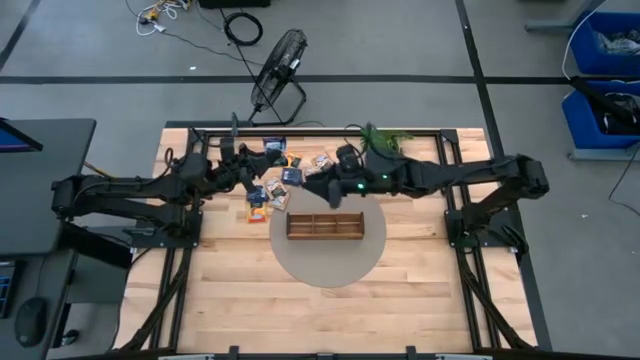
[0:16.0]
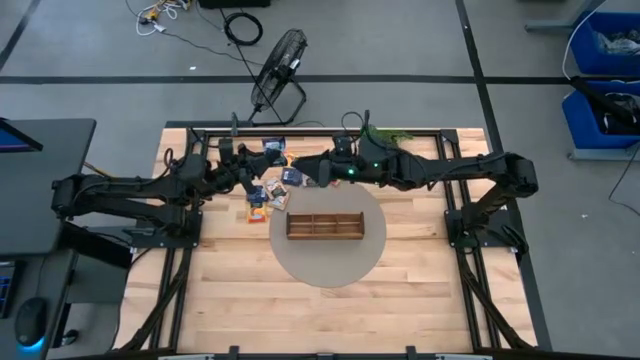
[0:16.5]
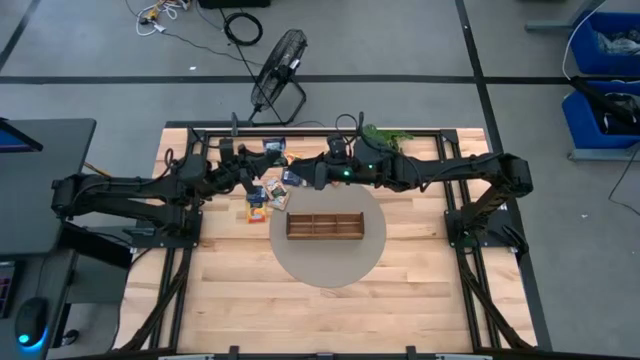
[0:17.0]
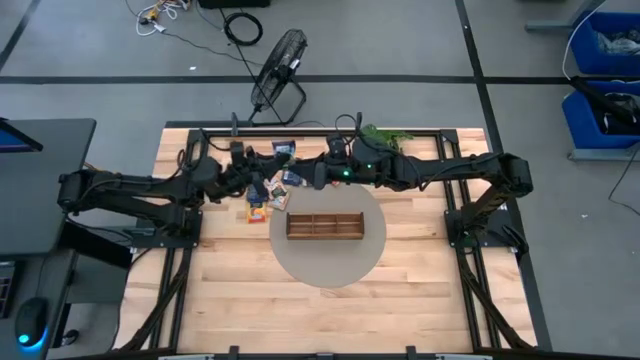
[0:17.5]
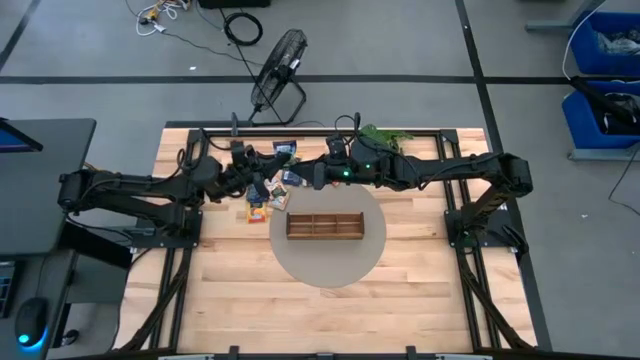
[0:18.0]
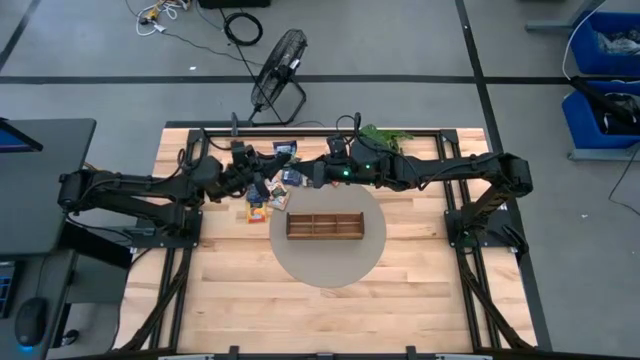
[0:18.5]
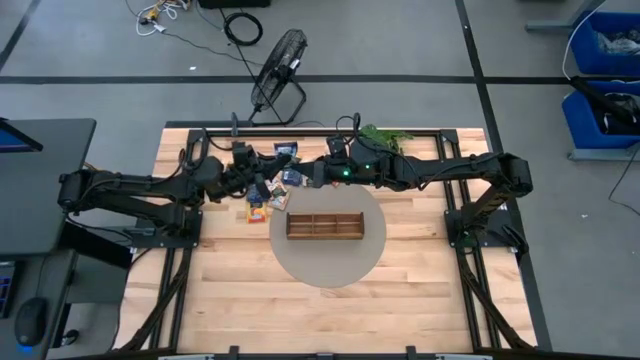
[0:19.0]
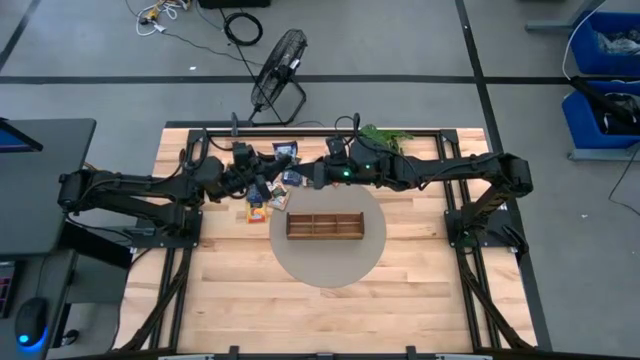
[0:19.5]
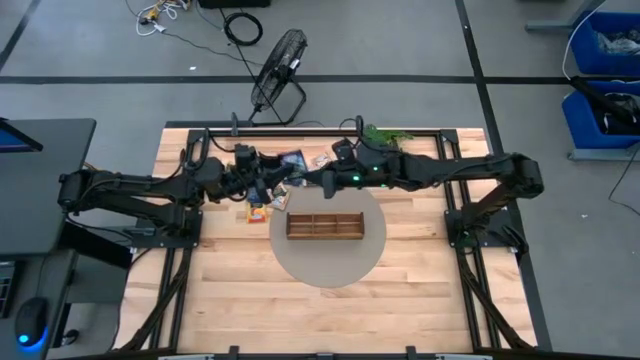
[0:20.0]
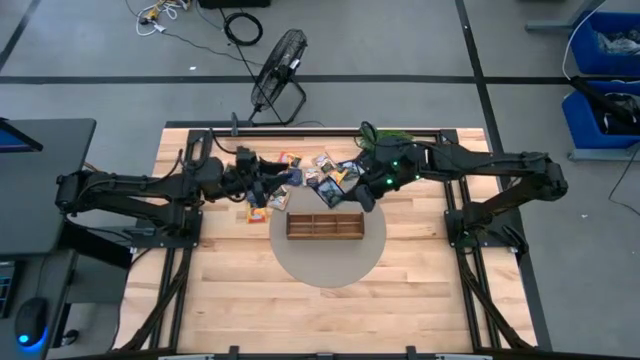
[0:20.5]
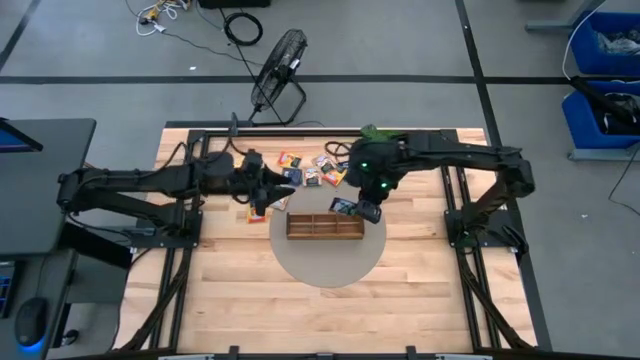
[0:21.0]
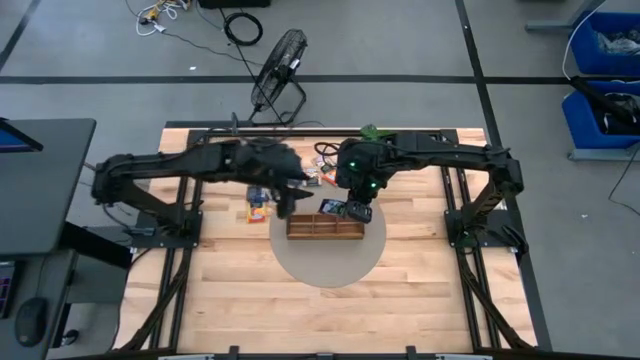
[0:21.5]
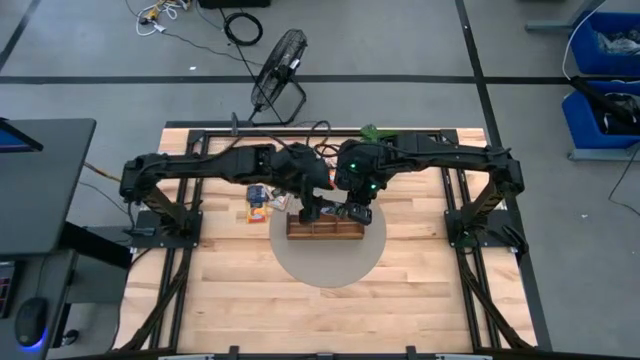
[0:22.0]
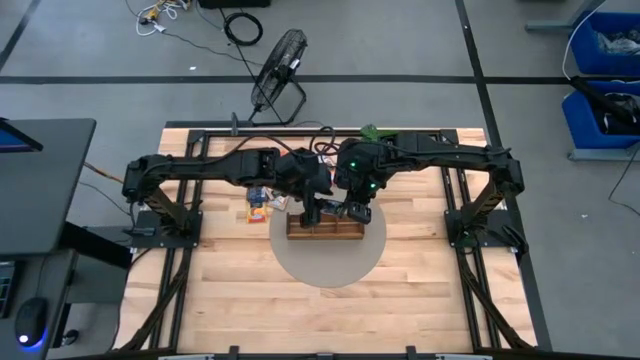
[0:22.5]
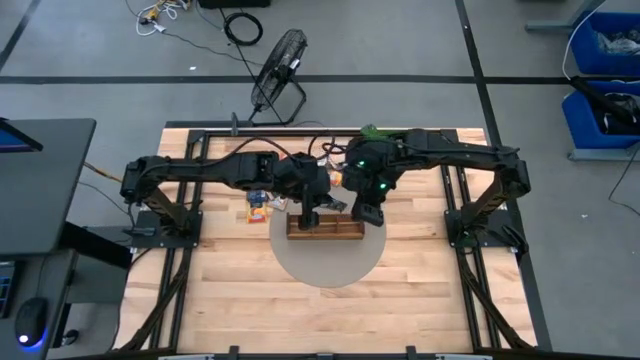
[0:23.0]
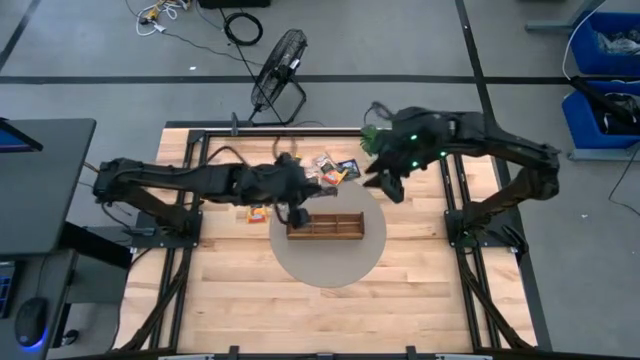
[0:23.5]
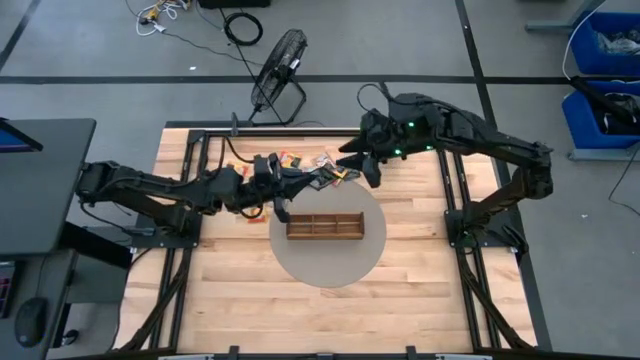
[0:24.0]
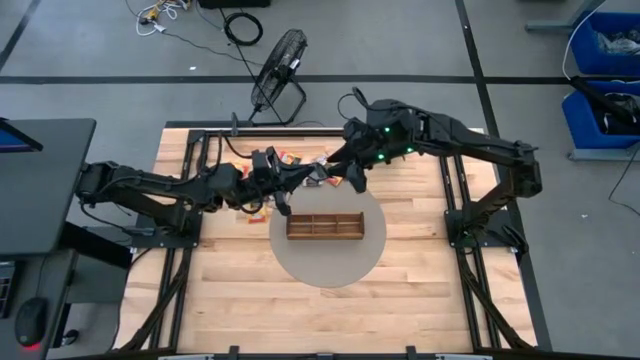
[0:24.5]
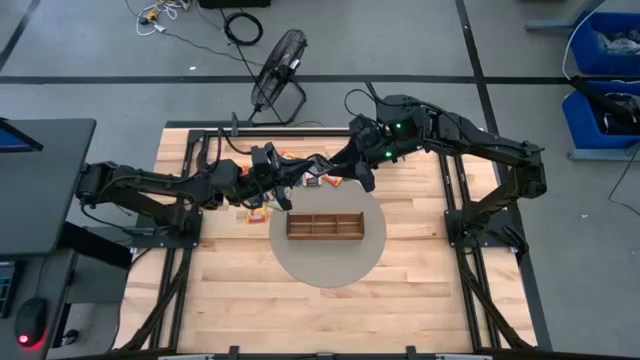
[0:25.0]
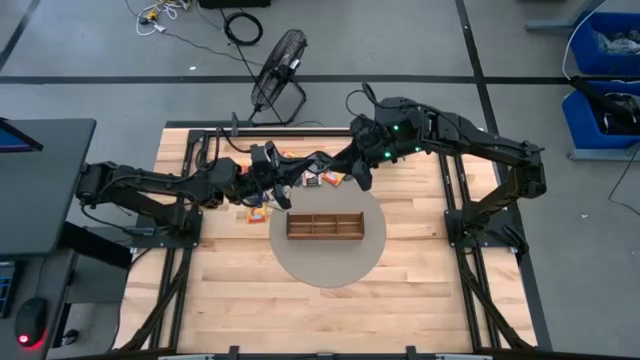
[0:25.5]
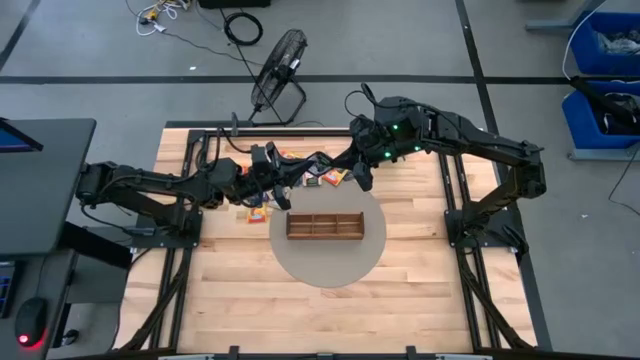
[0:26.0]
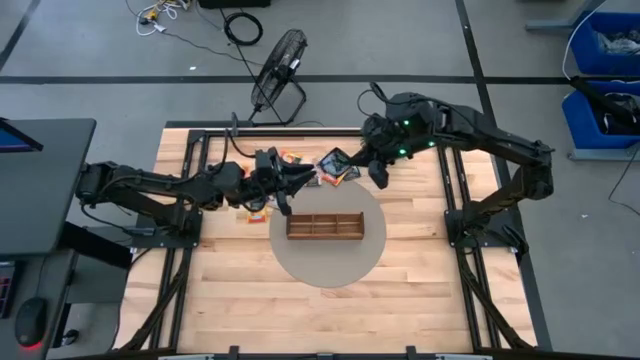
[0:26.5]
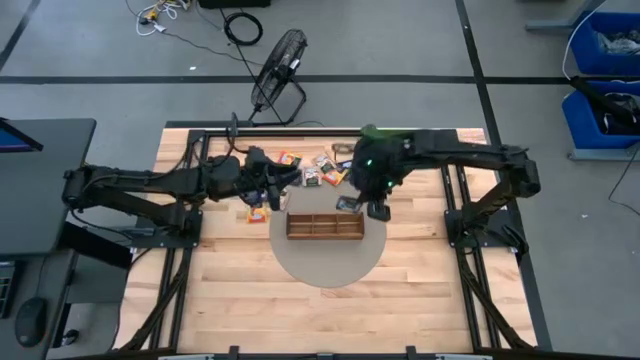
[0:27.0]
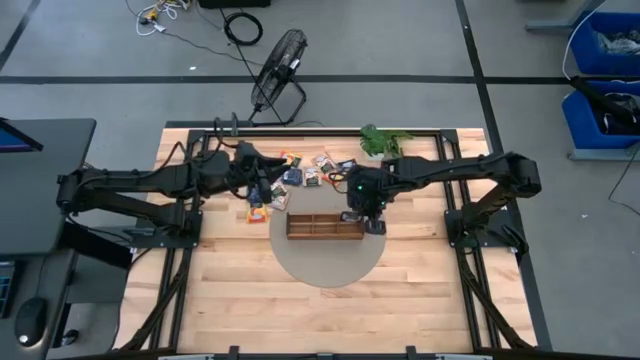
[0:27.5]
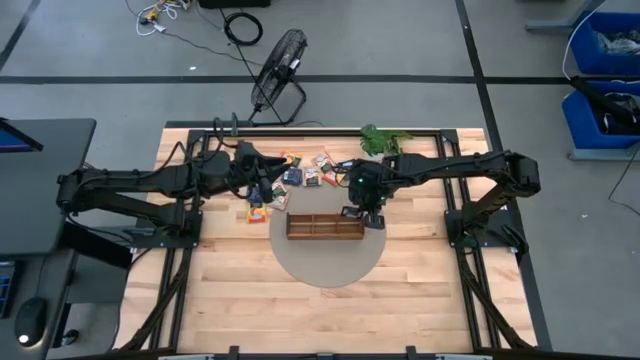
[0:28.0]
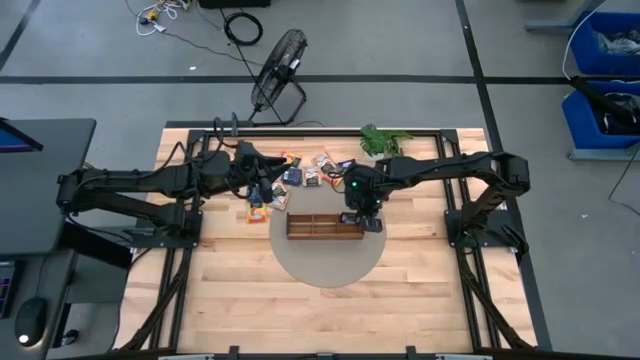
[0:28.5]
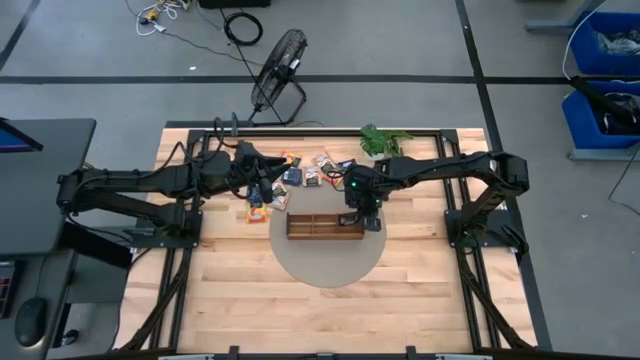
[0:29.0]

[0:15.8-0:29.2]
Task: Pick & Place Tea
Put the blue tea bag into the right section of the wooden organizer

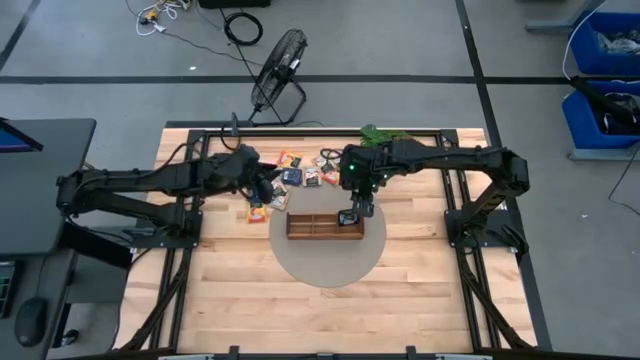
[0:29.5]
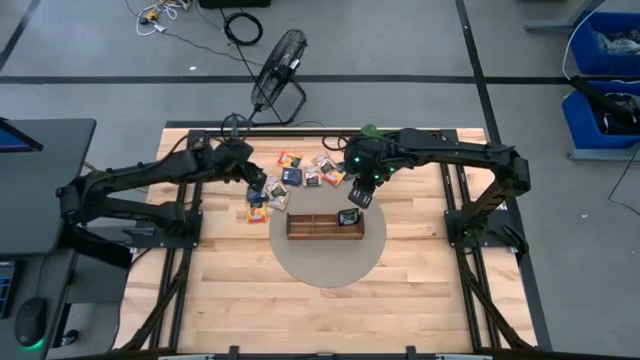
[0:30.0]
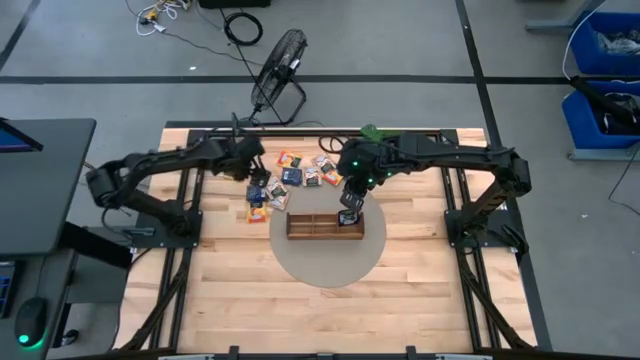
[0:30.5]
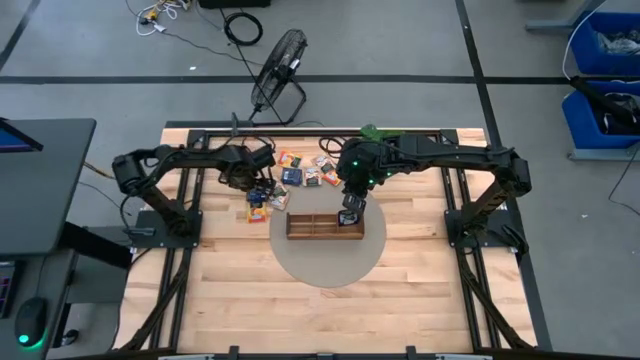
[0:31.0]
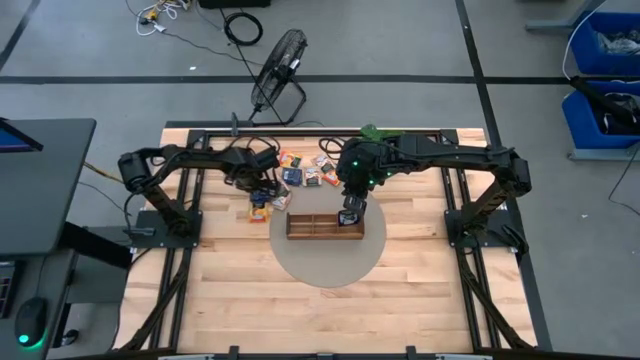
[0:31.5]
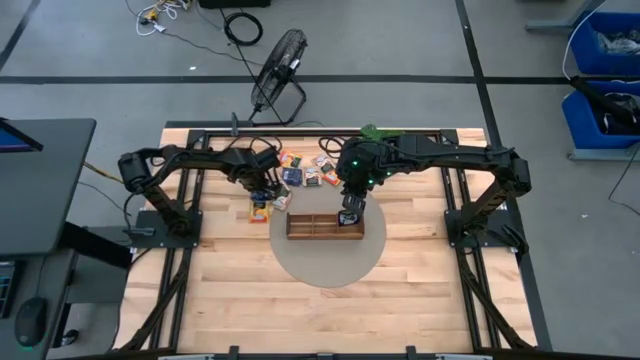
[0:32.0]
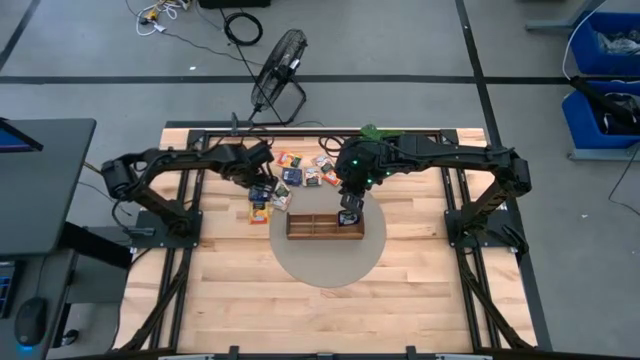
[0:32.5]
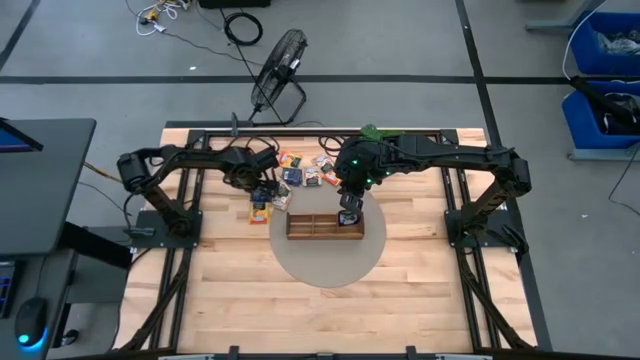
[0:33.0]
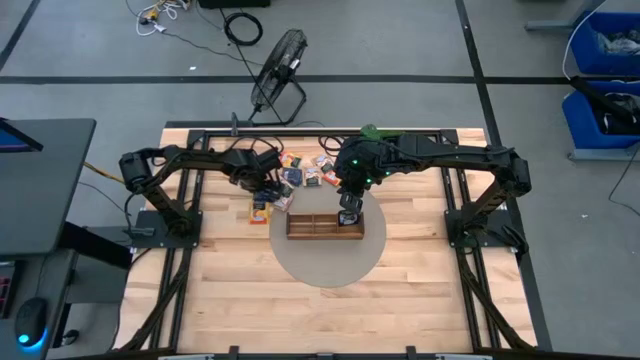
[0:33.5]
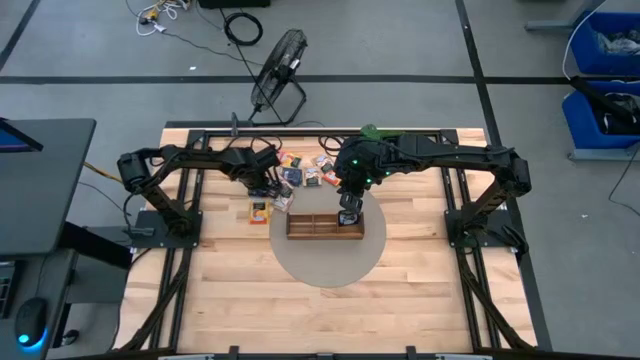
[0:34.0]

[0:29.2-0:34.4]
Put the blue tea bag into the right section of the wooden organizer

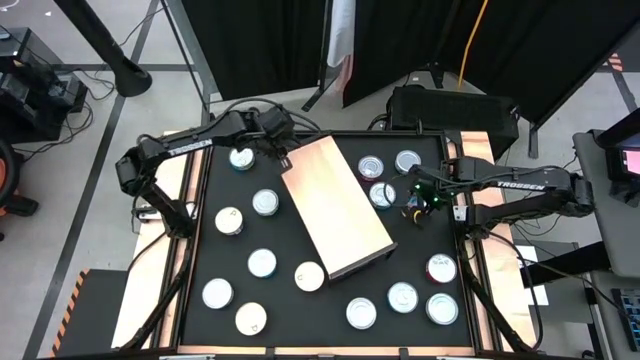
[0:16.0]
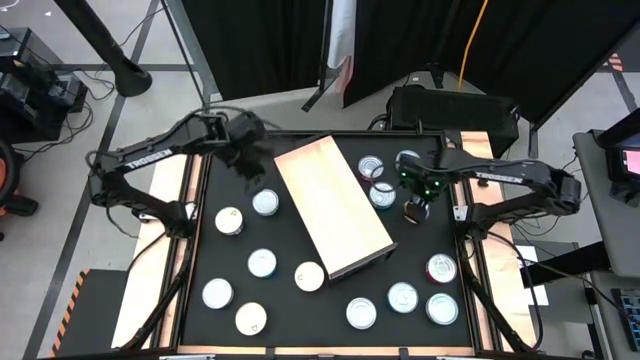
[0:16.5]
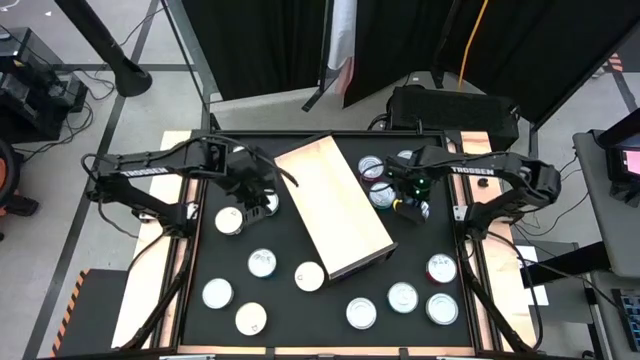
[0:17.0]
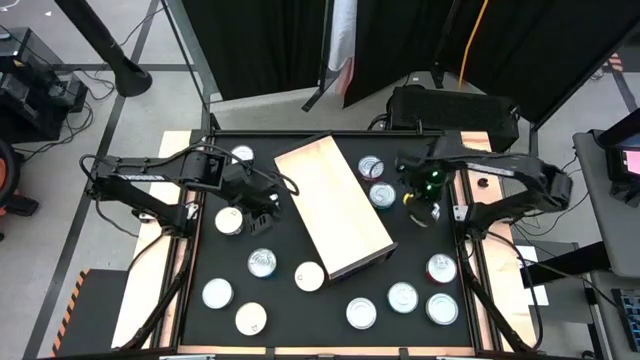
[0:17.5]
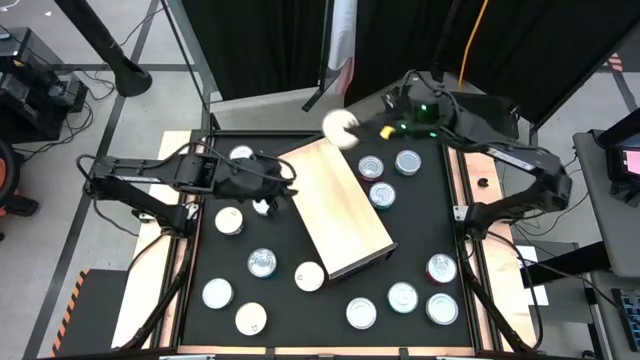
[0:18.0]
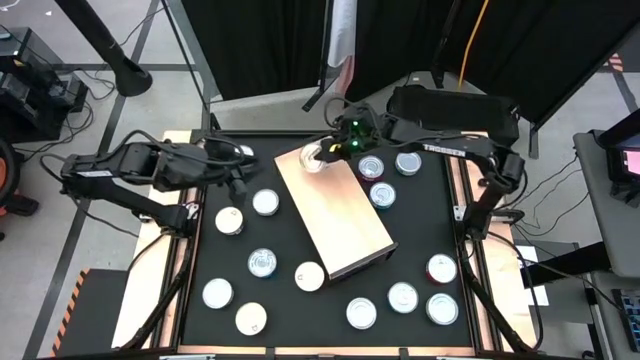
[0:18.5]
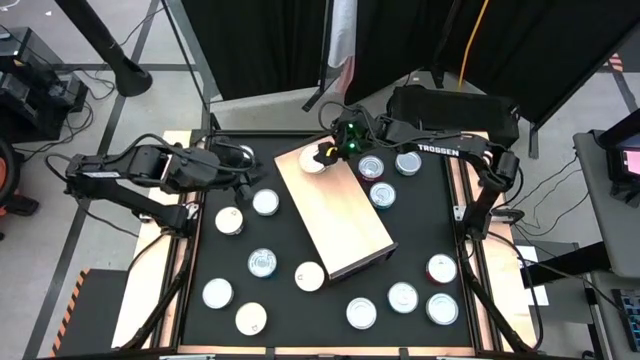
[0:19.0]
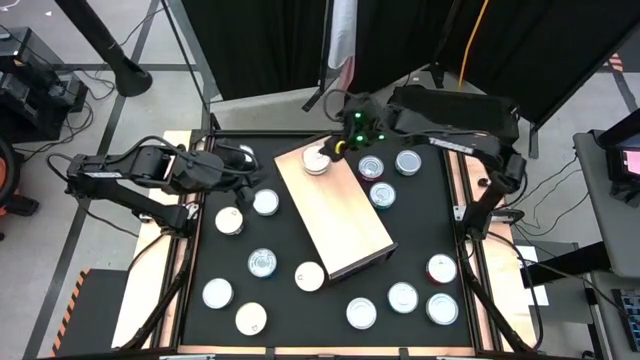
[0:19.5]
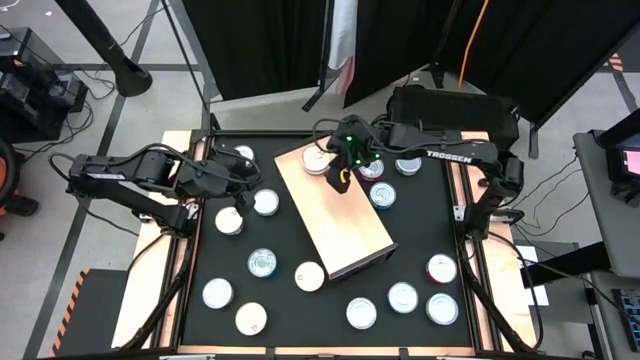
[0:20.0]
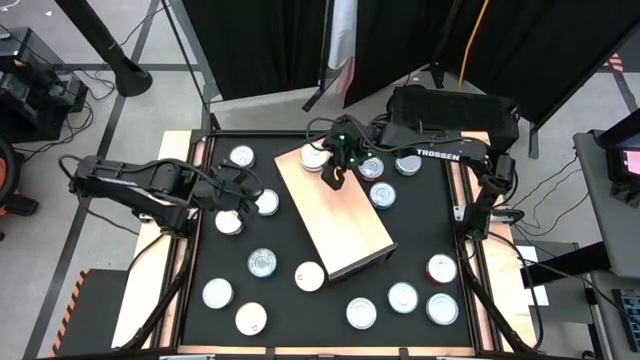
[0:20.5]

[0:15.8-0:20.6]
Task: Stack canned seafood by type on shelf
Put the blue-pink tuna can on the shelf
